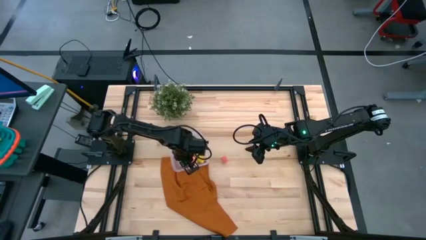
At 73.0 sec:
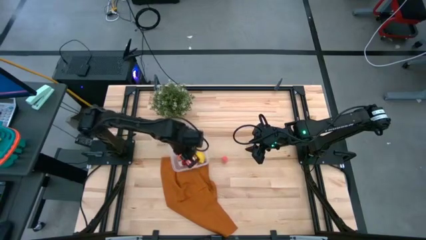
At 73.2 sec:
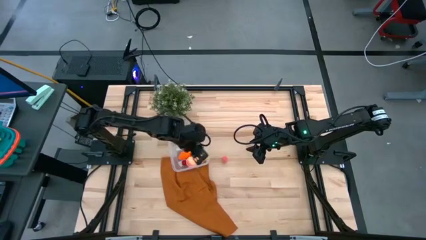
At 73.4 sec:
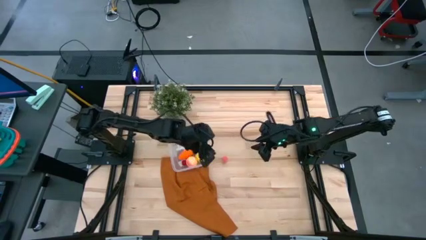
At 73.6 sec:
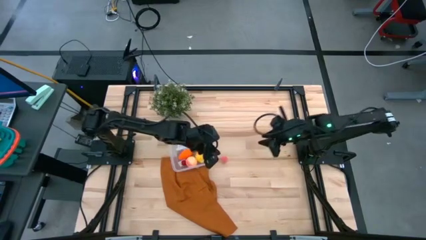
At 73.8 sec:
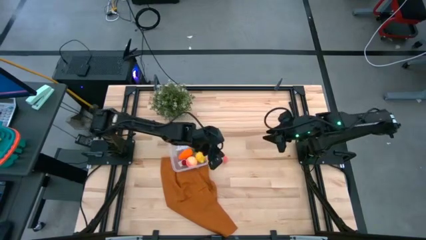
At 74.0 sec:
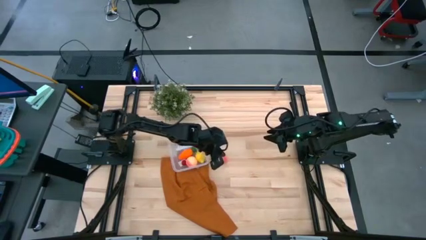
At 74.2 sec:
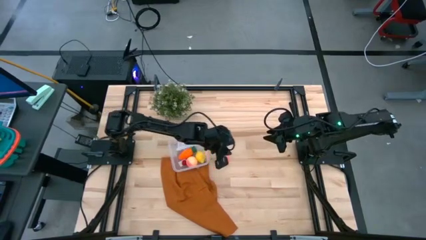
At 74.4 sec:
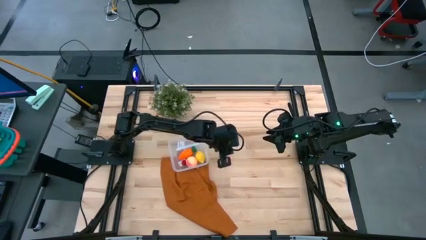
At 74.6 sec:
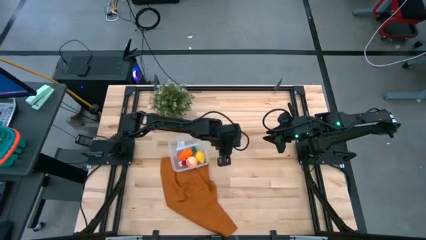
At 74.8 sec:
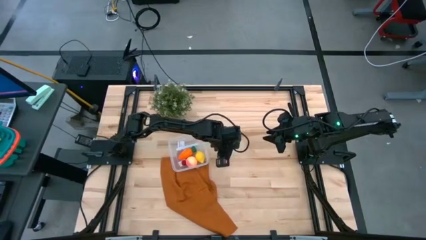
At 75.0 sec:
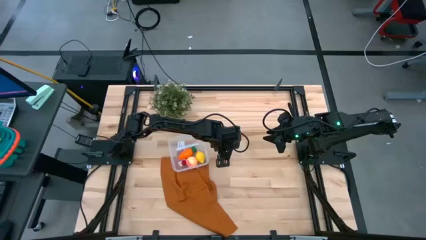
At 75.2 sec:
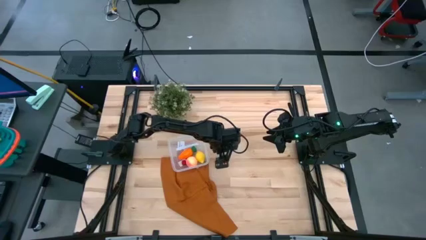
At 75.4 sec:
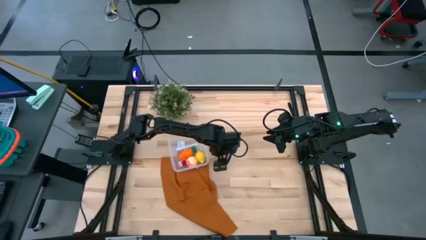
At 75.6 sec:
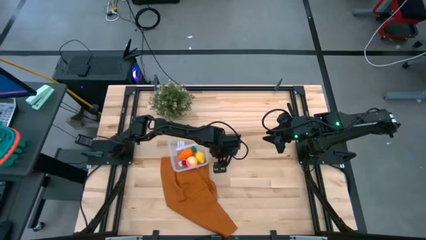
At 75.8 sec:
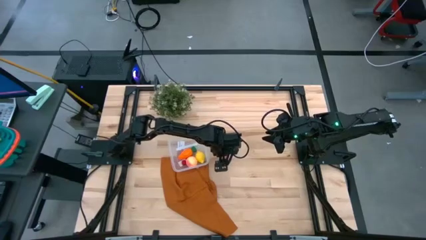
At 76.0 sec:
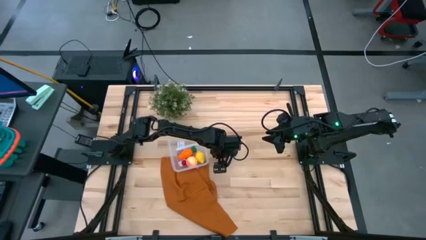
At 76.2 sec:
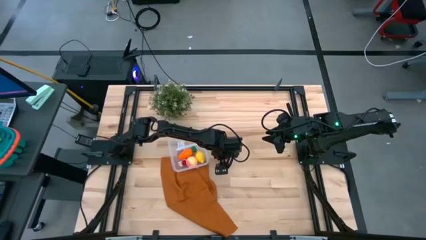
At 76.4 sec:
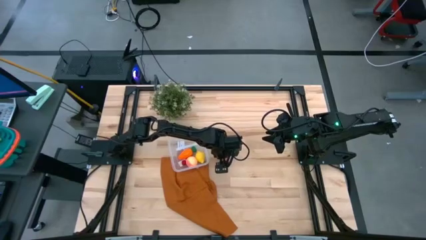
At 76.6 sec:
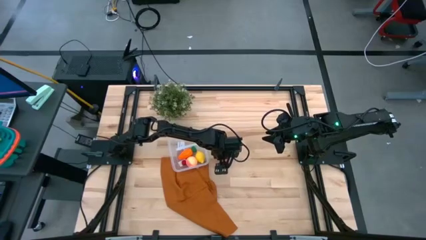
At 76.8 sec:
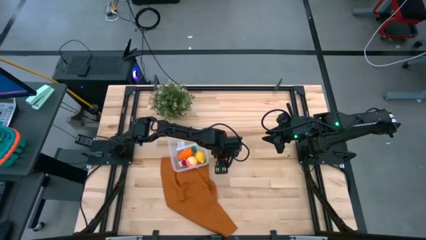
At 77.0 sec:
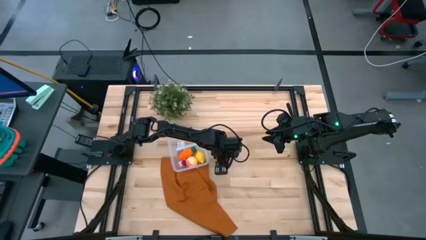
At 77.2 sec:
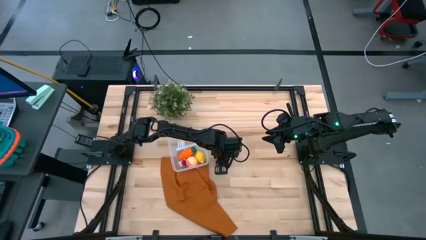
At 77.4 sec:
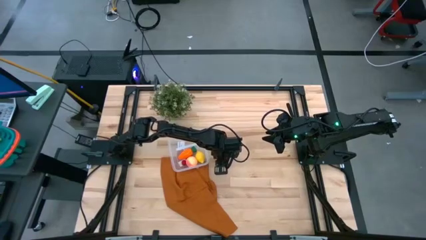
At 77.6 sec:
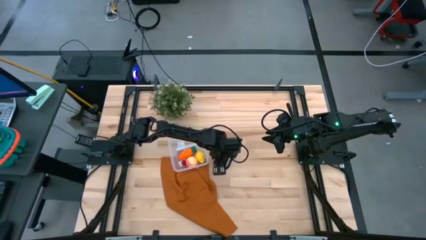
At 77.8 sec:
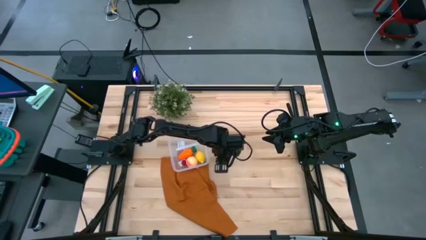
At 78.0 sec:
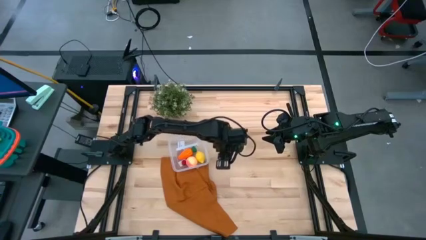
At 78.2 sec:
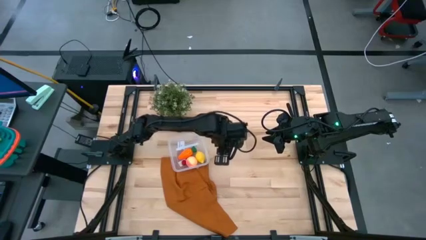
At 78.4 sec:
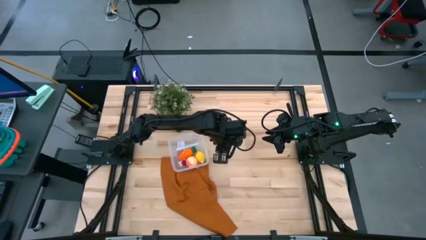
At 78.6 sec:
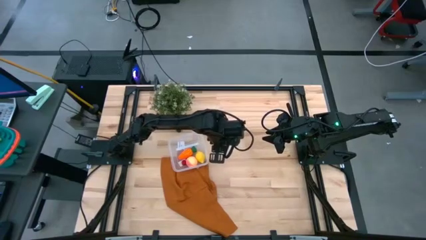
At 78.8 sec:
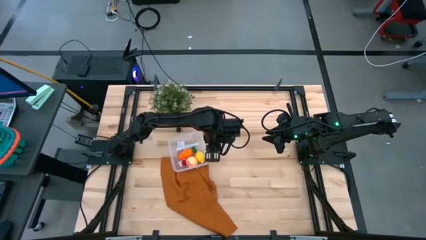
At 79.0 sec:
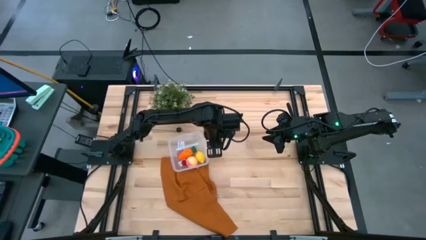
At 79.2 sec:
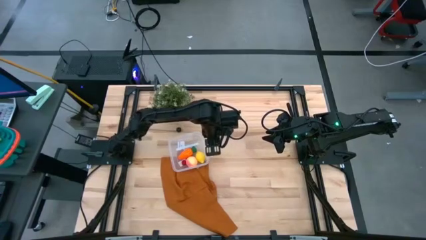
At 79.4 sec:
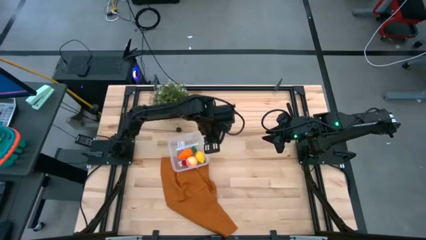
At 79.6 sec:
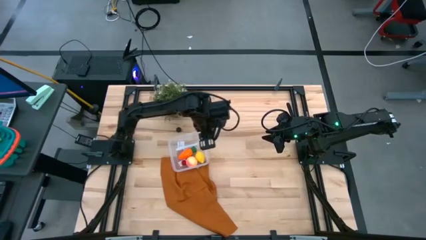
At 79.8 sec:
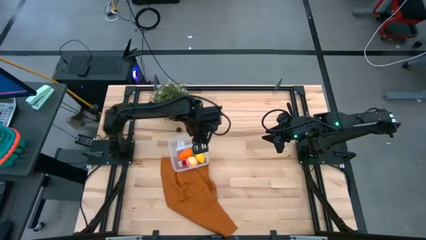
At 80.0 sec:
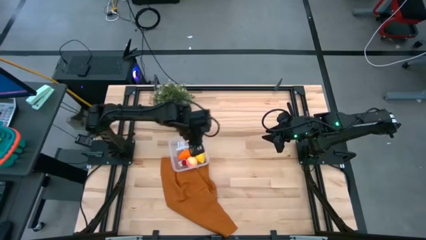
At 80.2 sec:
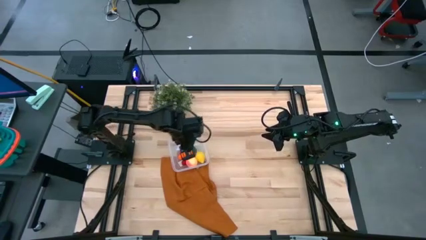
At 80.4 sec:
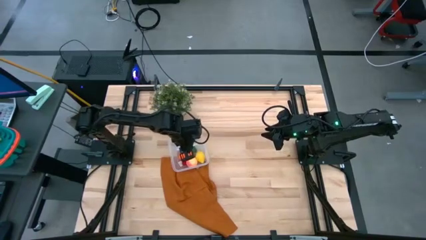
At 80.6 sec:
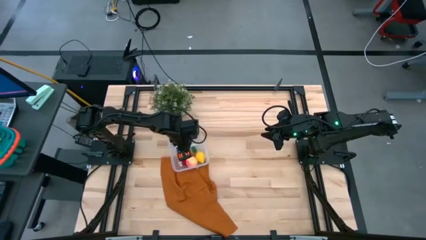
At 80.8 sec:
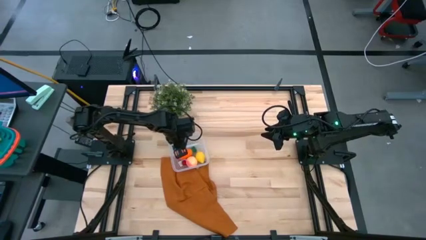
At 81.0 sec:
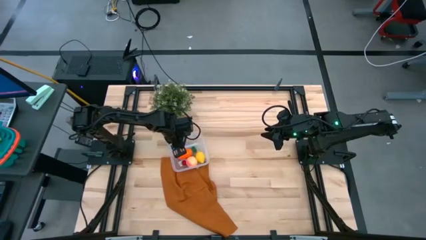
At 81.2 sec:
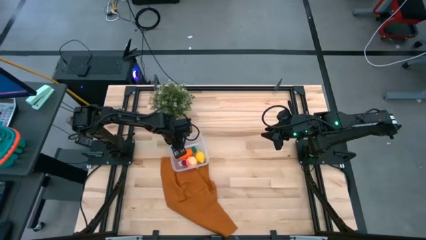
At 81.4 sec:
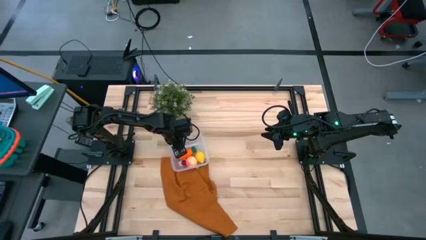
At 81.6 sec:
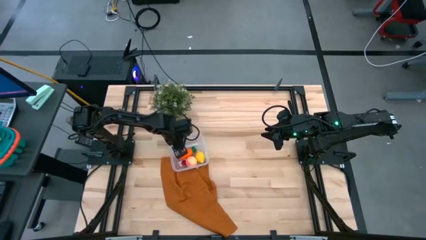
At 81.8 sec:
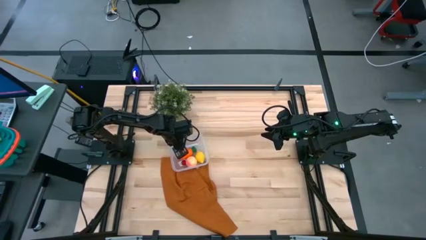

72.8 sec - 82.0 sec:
Task: Pick and placing Produce into tupperware
Put the pink peach into the bin

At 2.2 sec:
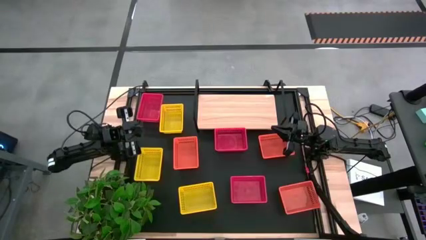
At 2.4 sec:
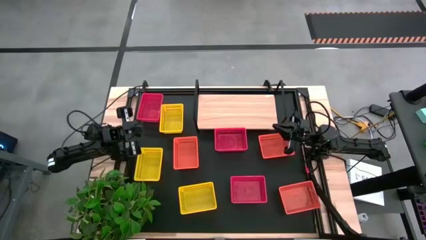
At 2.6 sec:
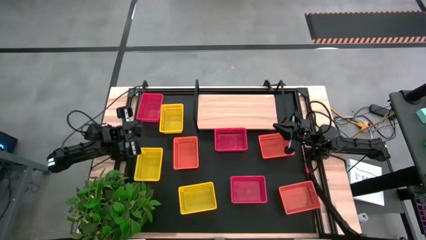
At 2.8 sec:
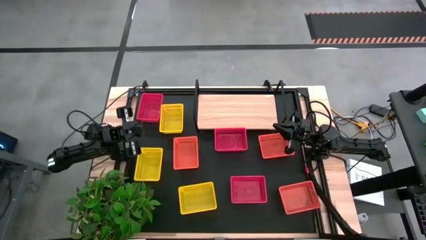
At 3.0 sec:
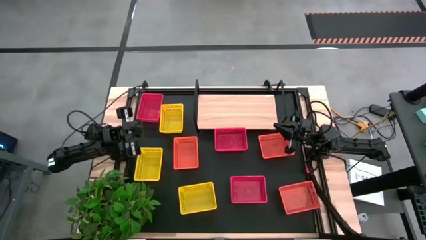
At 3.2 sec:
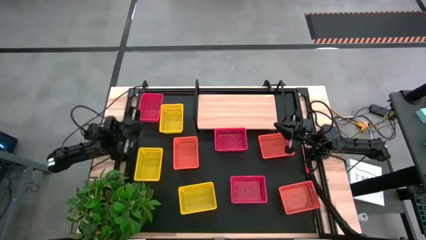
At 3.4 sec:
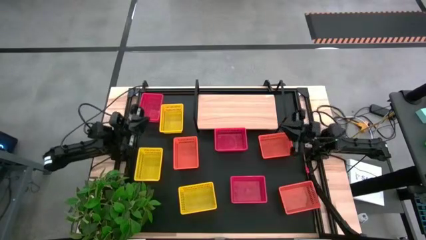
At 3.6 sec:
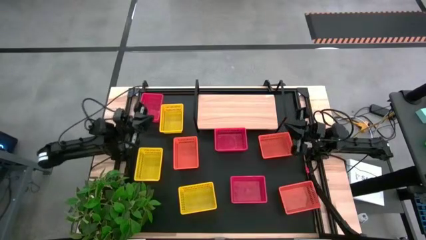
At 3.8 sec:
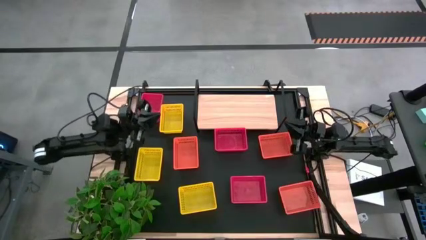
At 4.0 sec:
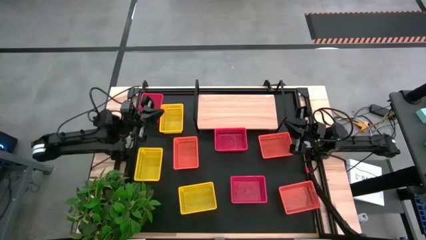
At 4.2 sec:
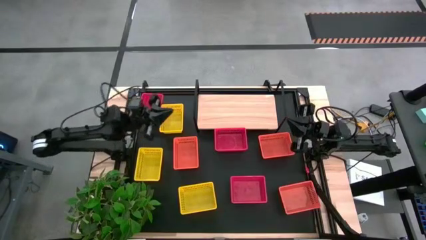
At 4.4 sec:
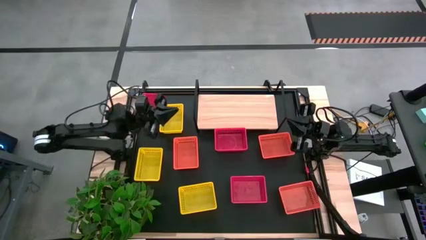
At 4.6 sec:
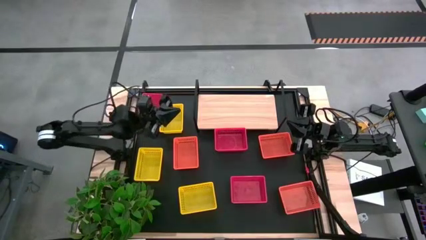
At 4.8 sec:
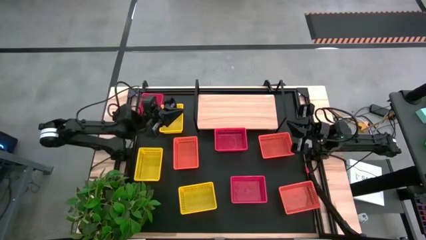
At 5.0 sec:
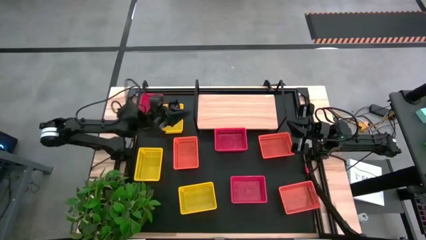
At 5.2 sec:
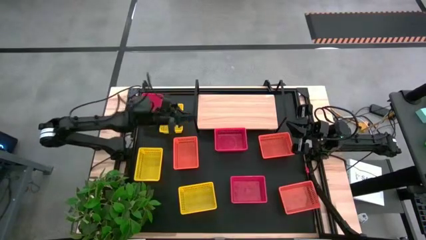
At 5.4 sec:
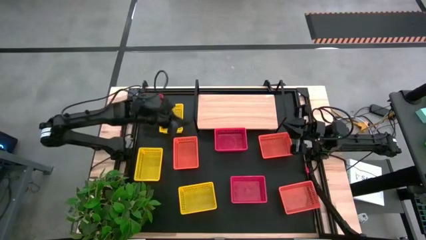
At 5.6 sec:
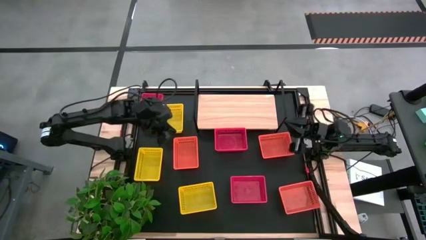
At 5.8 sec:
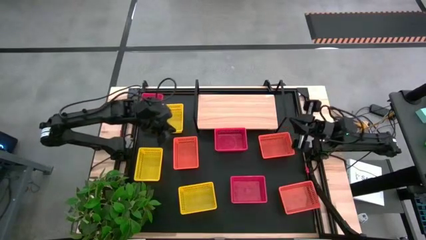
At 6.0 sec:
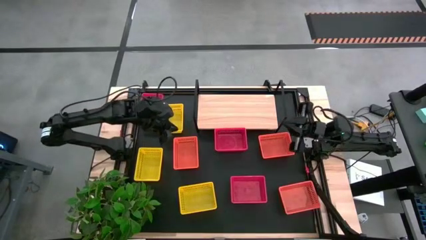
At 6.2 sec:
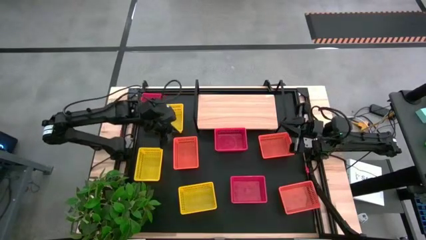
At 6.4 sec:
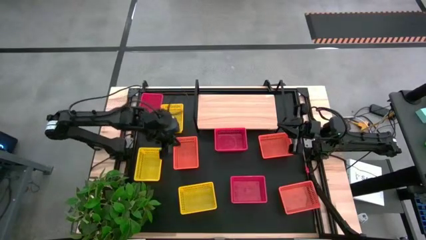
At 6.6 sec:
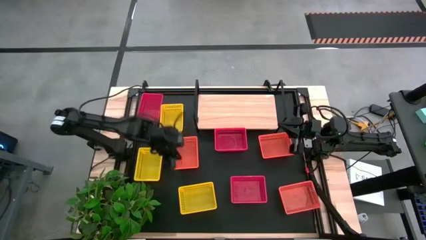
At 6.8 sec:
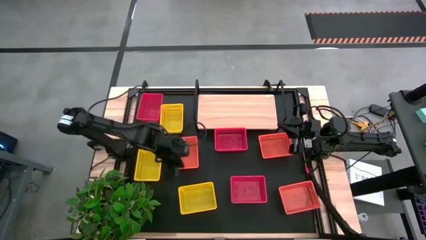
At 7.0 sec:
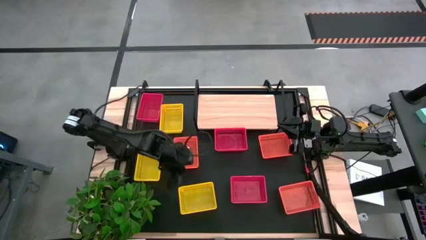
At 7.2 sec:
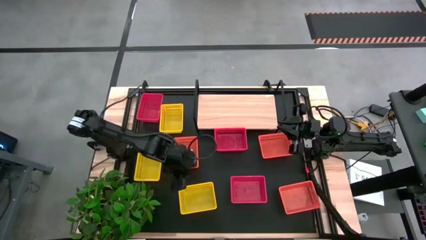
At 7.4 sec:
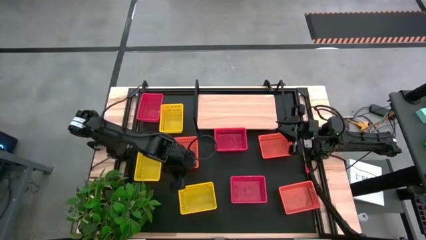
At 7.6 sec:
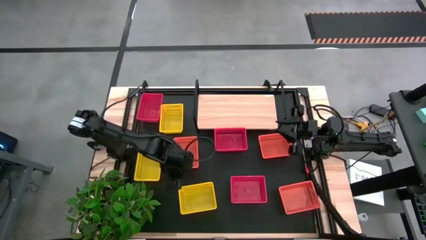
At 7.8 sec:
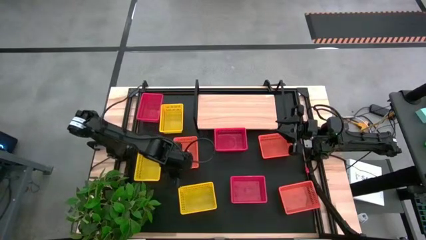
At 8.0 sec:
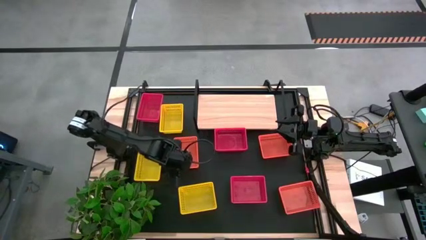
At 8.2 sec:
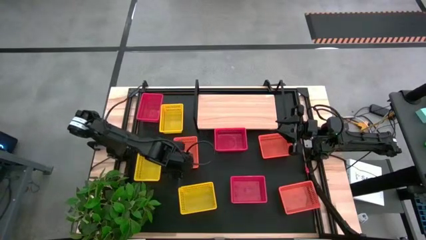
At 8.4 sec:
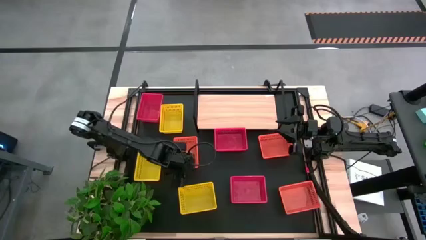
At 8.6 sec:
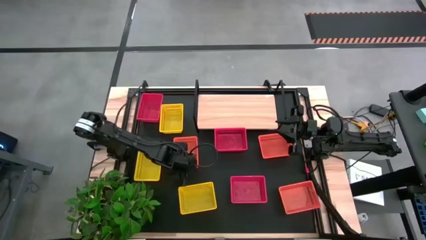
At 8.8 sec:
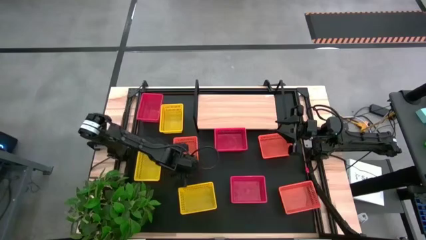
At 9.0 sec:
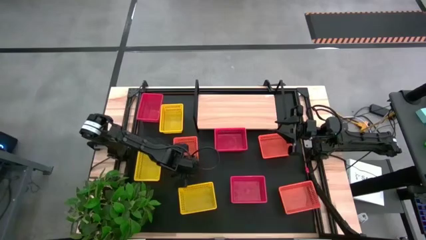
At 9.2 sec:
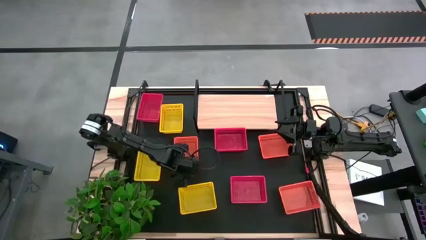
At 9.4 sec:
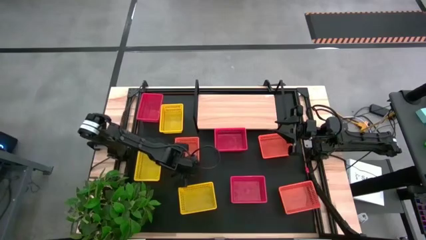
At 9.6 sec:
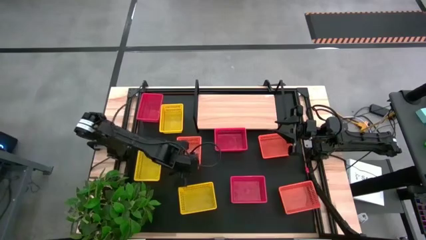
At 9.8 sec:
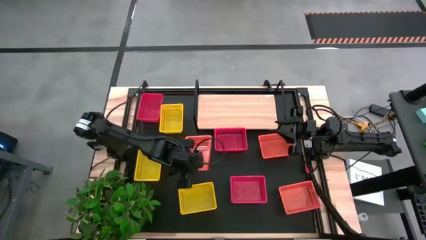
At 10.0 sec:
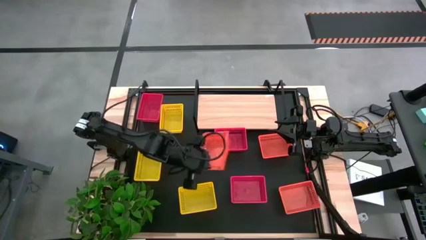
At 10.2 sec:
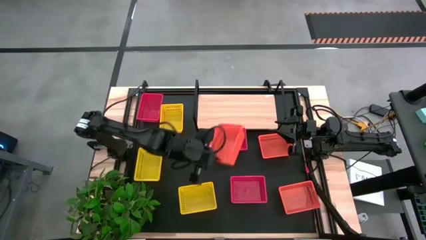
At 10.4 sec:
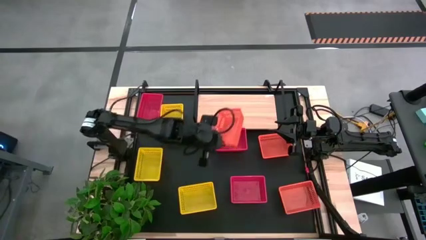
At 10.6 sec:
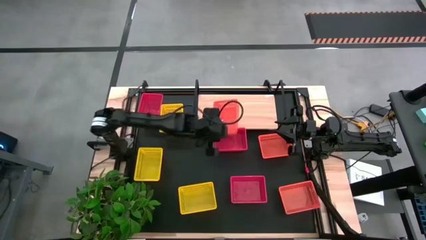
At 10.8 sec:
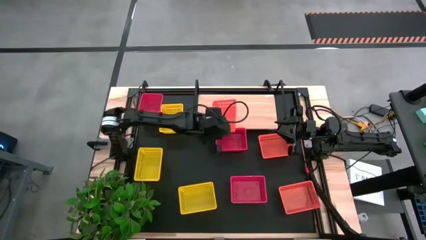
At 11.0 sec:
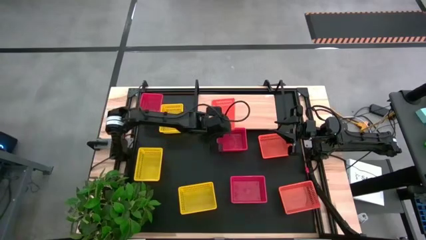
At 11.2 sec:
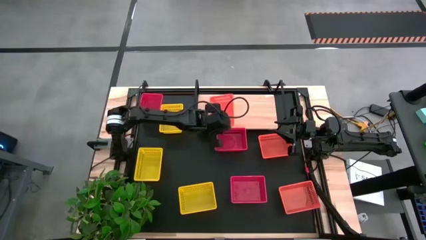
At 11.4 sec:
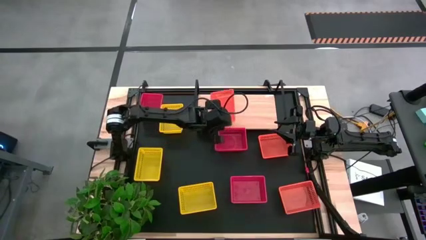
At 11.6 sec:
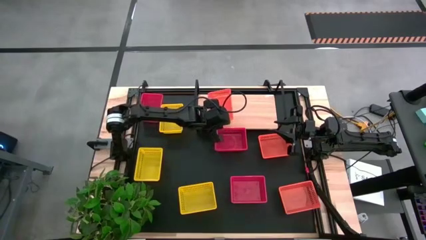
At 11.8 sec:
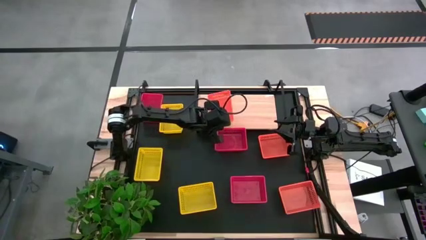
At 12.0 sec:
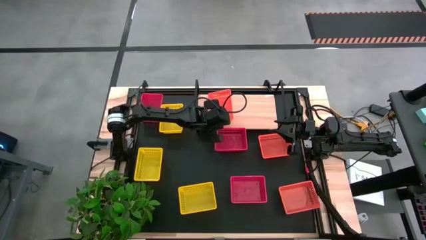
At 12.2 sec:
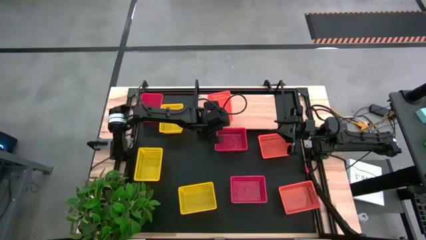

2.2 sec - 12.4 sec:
Task: Stack baskets on shelf by color
Put the top left orange basket on the shelf
